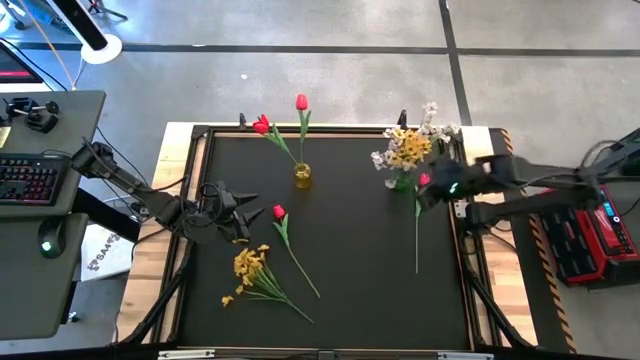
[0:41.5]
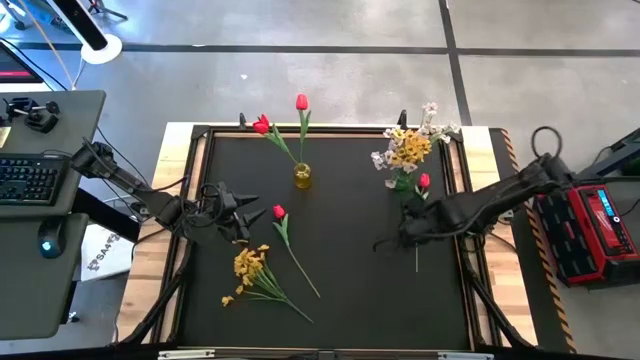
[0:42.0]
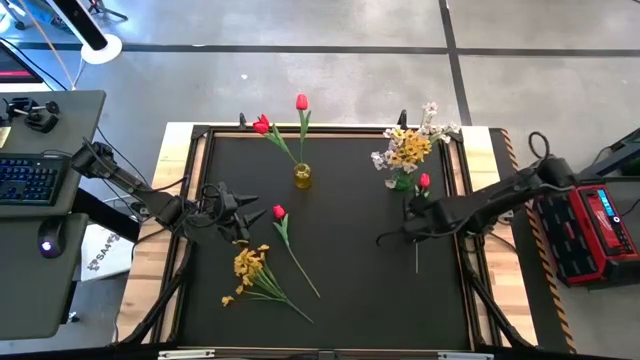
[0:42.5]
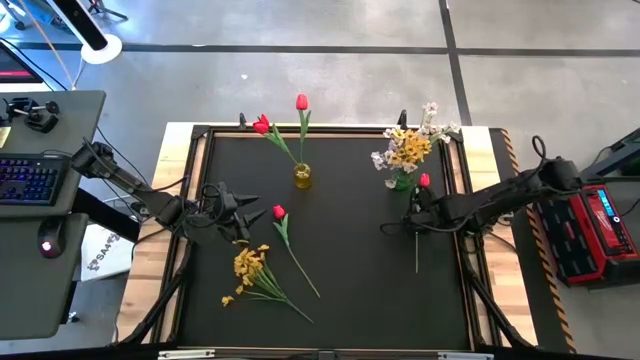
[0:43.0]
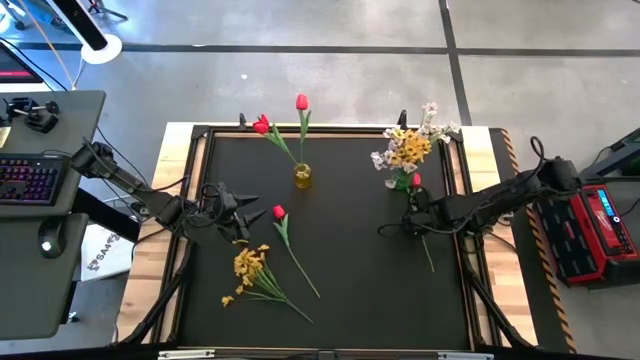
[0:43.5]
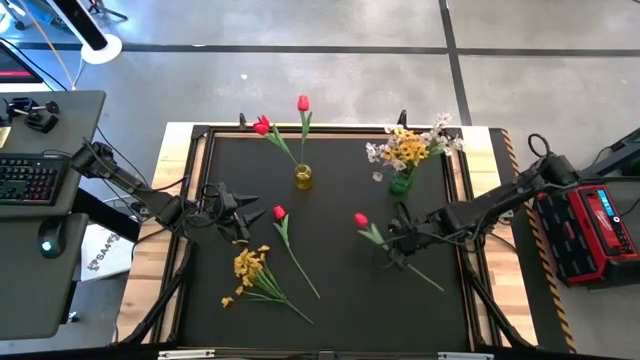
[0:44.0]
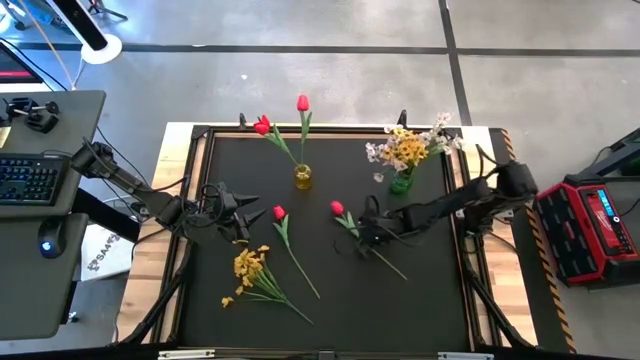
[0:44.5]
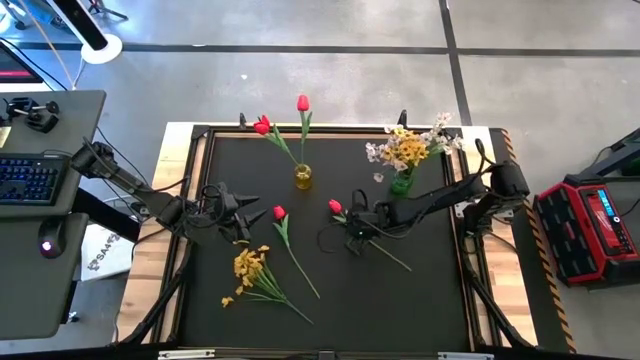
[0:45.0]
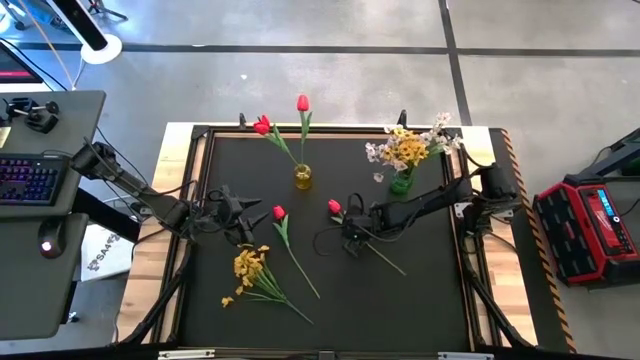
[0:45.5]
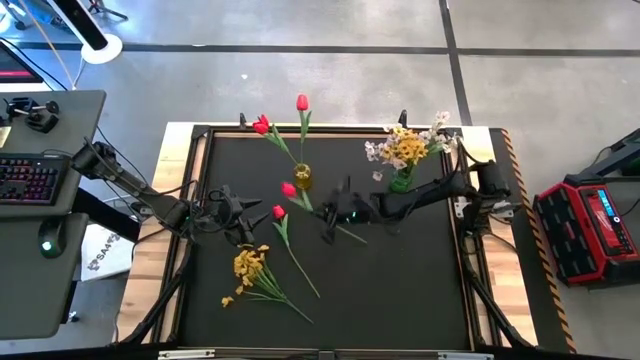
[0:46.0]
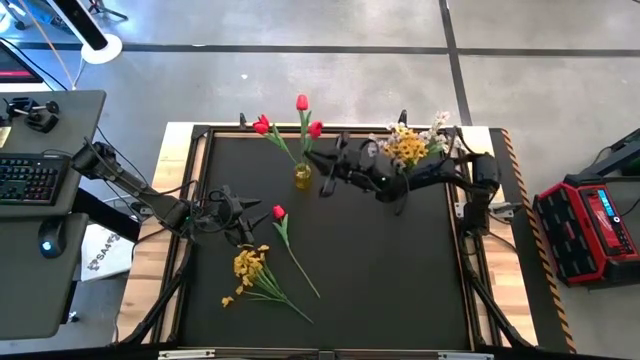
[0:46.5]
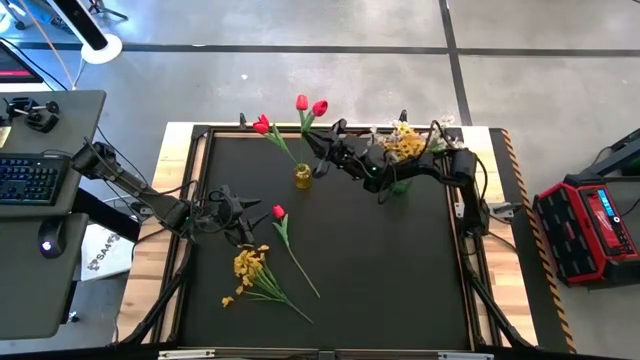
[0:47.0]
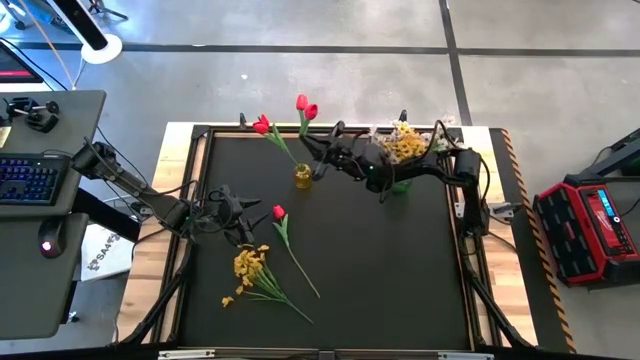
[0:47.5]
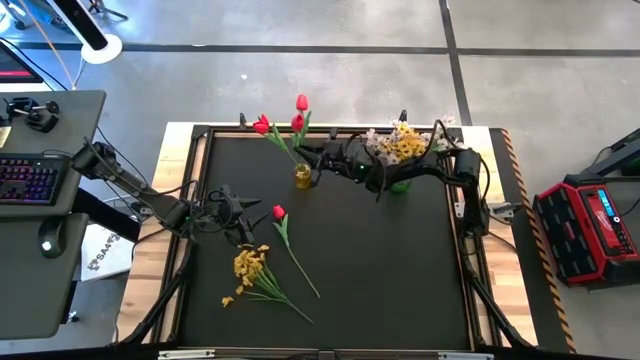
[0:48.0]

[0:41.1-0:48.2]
Task: Sort flowers into vase by color
Put the red tulip into the yellow vase

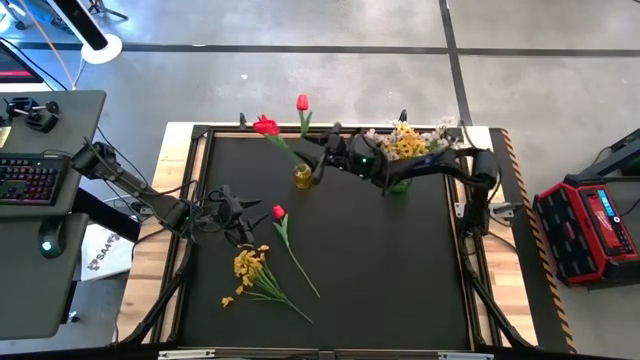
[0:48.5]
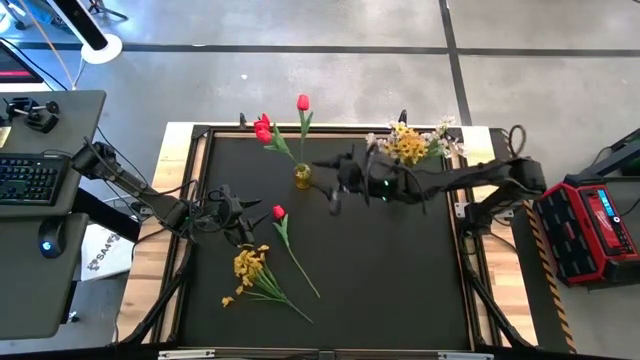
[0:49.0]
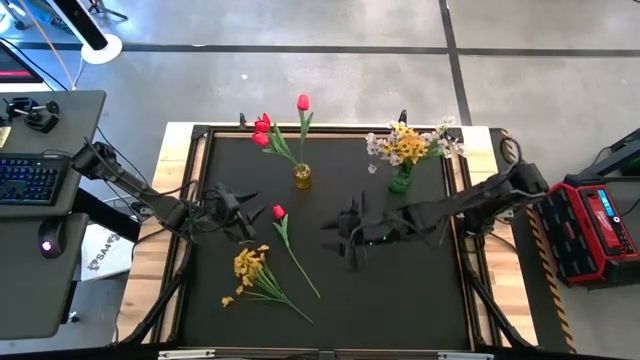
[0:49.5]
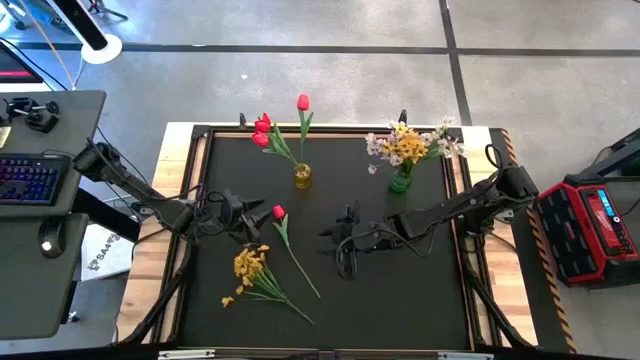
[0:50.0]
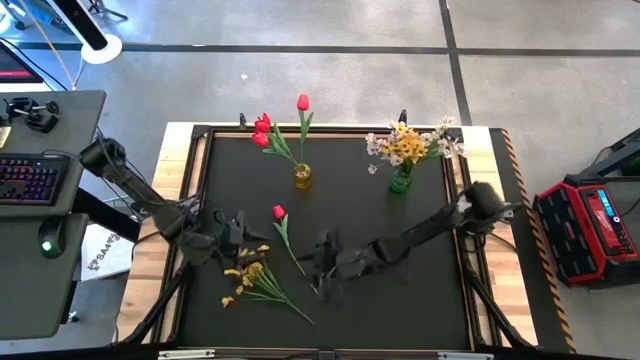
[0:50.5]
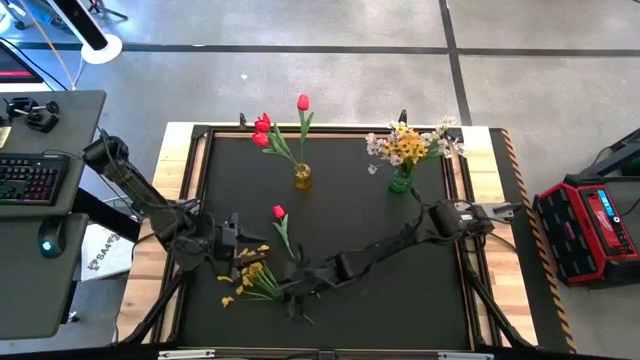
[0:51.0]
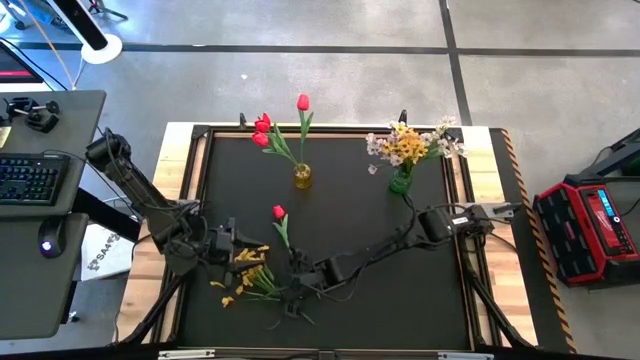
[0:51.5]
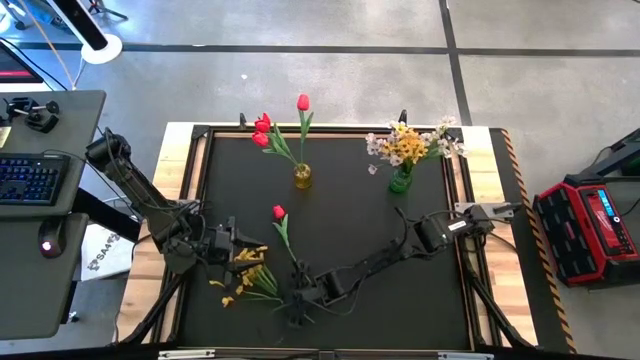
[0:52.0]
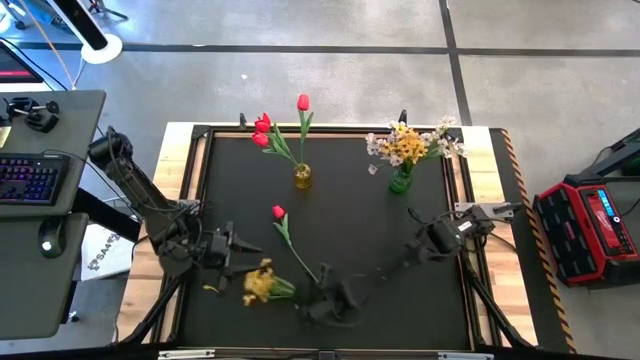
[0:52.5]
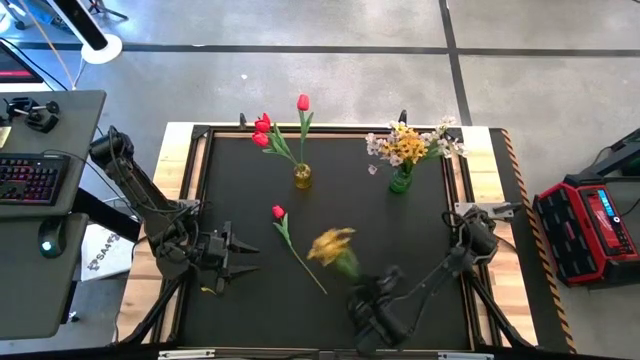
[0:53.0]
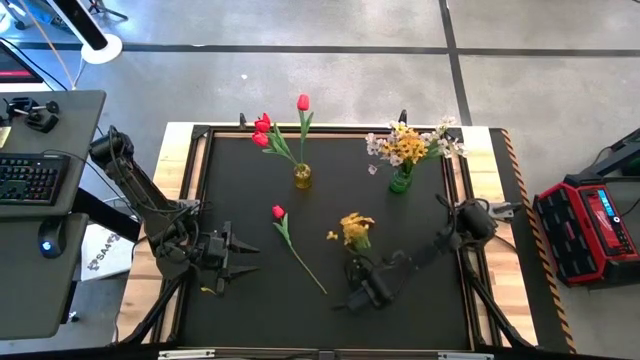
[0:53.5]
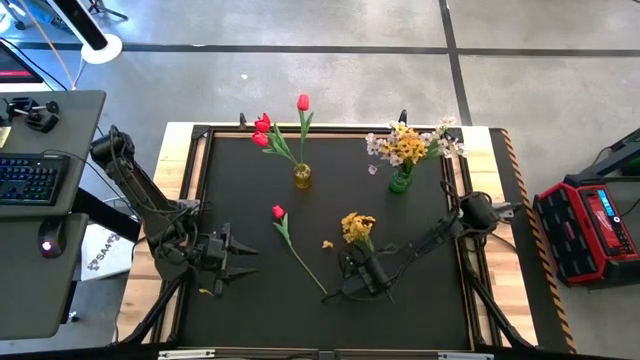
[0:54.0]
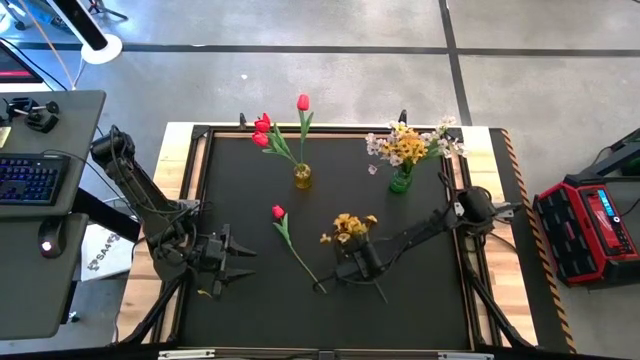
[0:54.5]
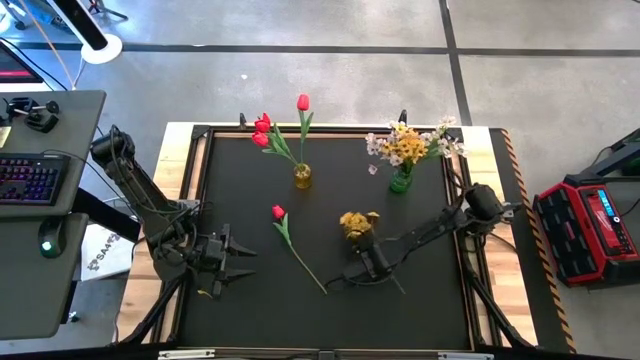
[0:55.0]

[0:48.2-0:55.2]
Put the yellow flowers into the yellow vase

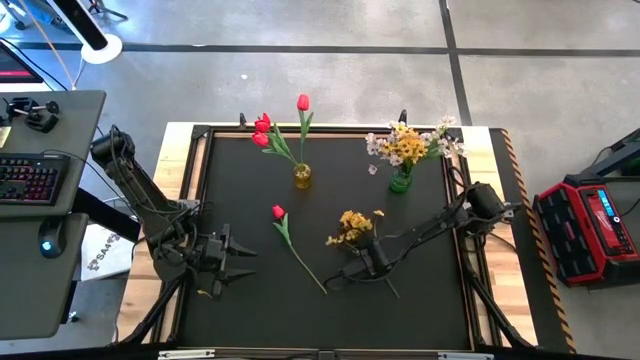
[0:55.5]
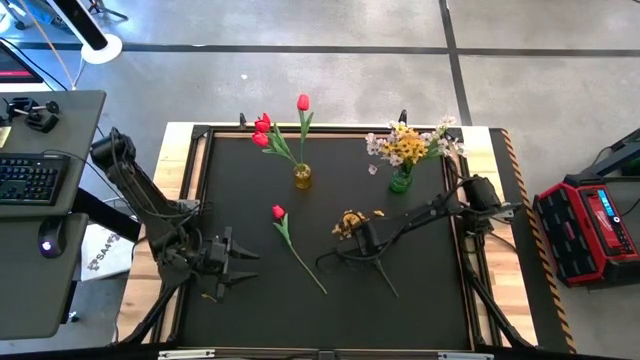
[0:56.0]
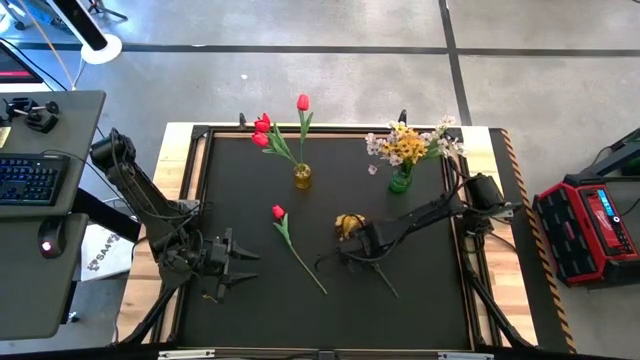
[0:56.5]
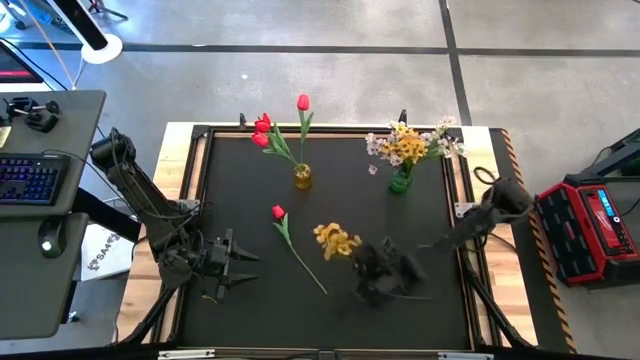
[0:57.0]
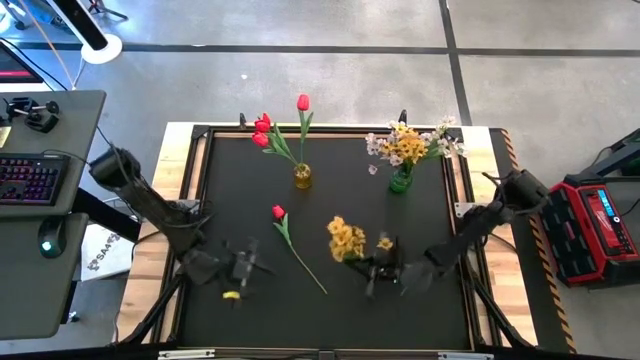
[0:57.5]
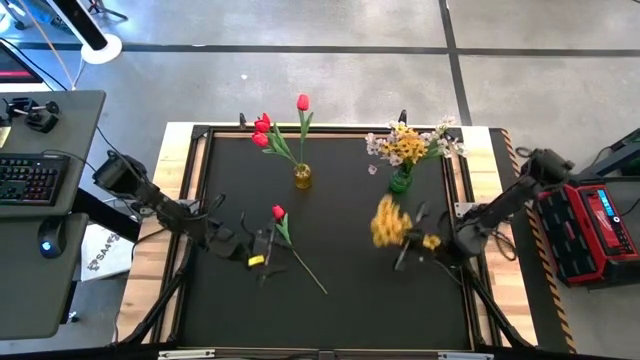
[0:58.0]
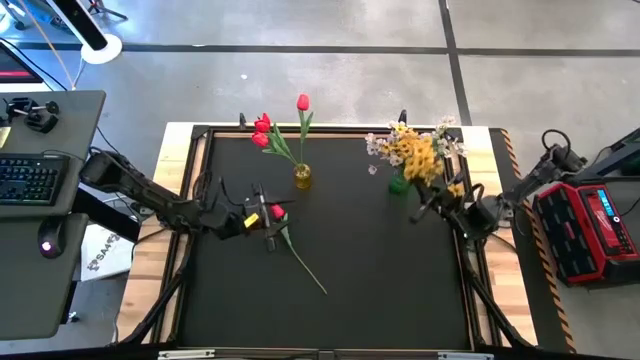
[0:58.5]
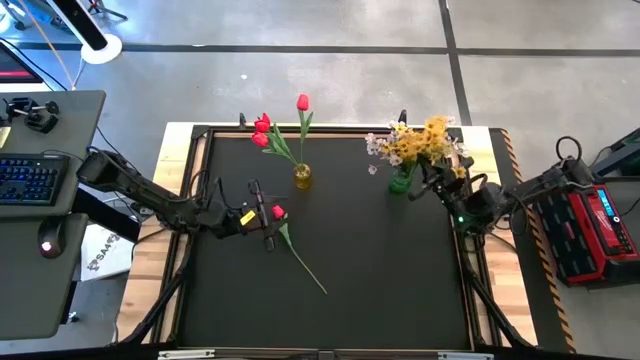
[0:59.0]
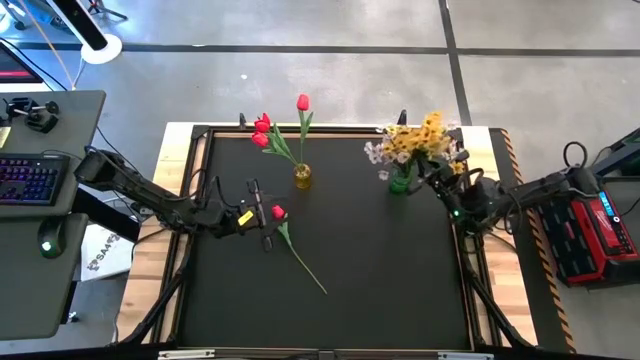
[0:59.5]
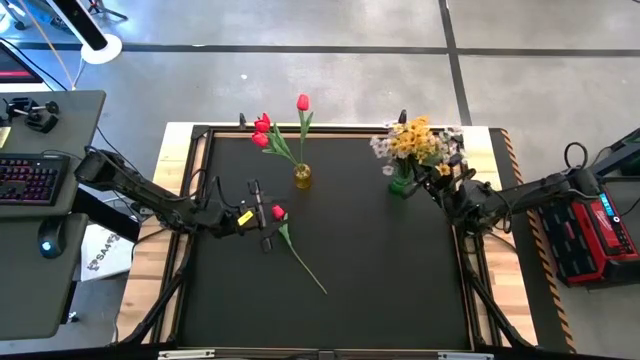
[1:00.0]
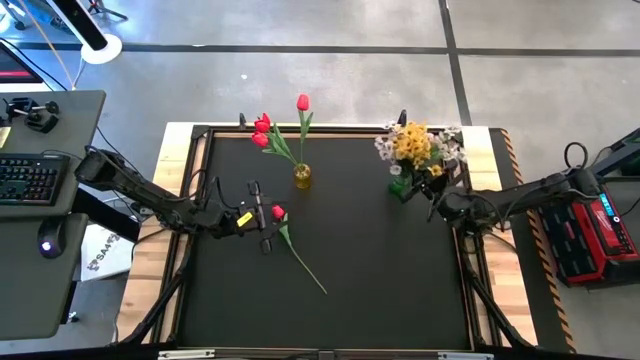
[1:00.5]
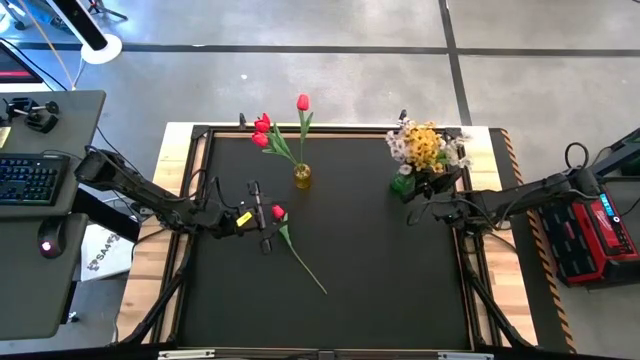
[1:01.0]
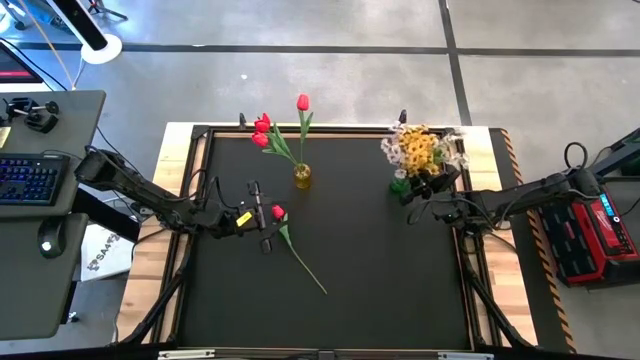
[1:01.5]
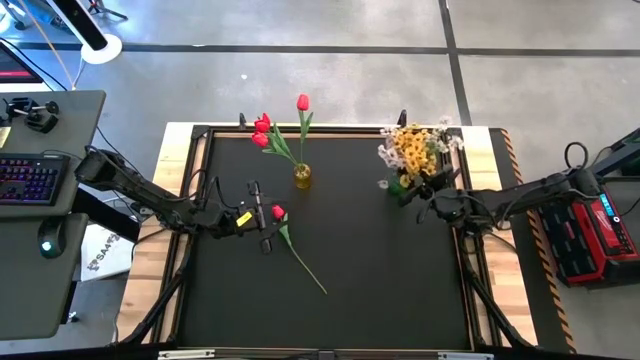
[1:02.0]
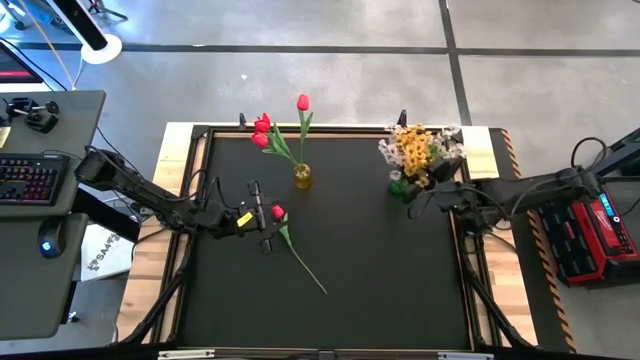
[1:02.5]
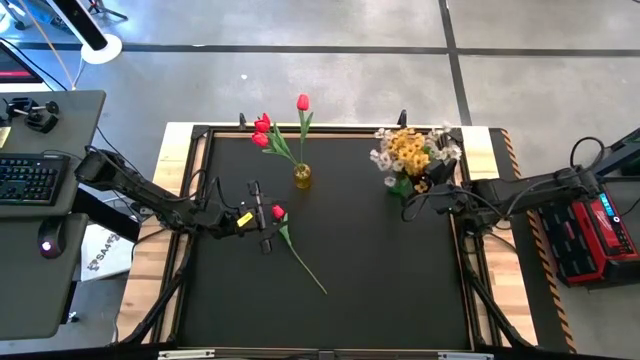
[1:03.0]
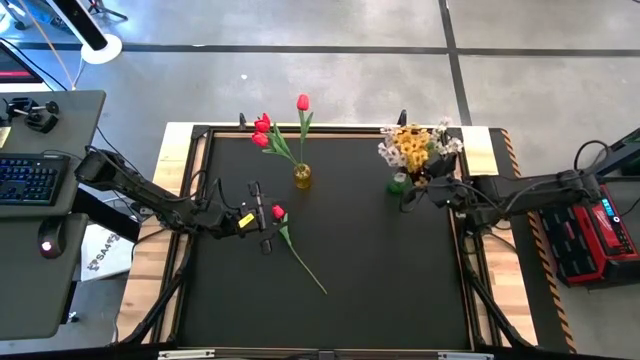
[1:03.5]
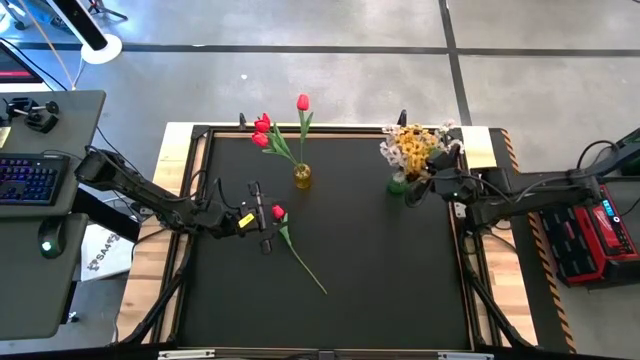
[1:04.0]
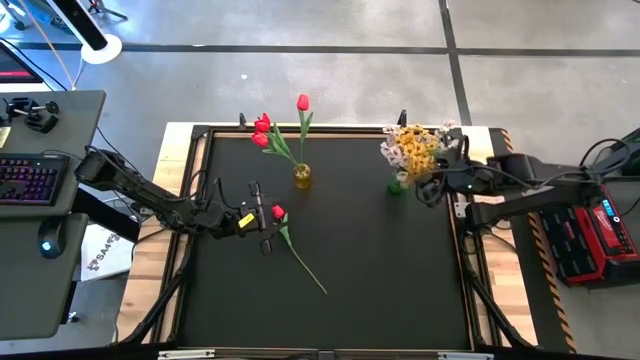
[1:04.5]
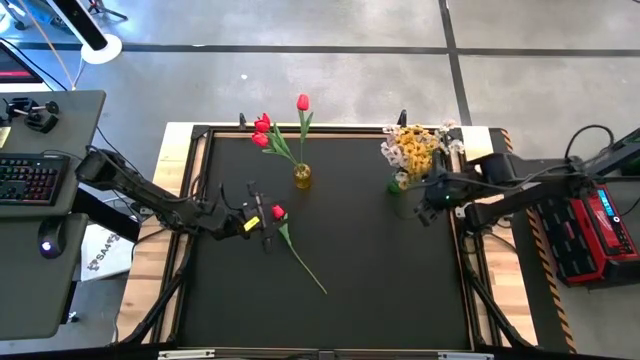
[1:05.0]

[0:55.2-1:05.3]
Put the yellow flowers into the green vase
